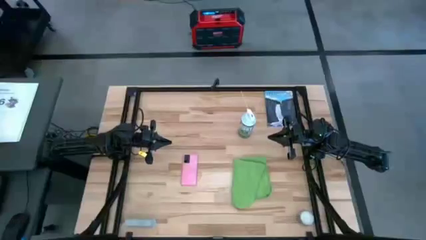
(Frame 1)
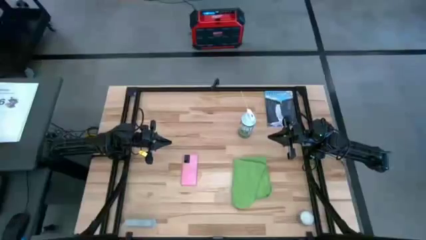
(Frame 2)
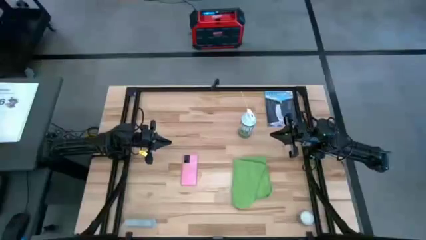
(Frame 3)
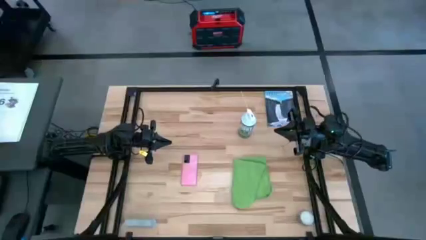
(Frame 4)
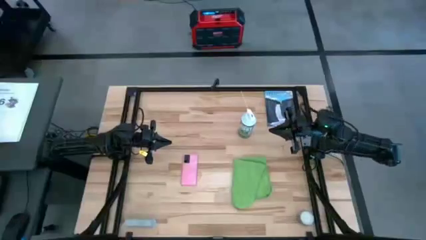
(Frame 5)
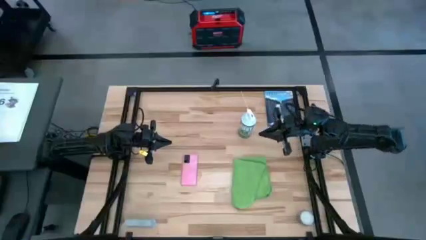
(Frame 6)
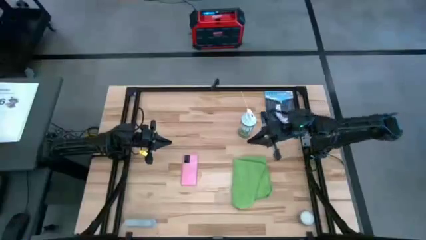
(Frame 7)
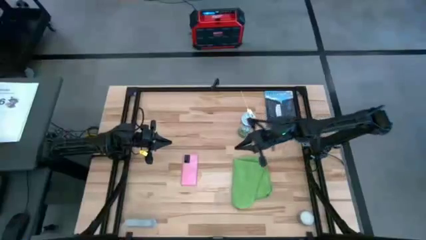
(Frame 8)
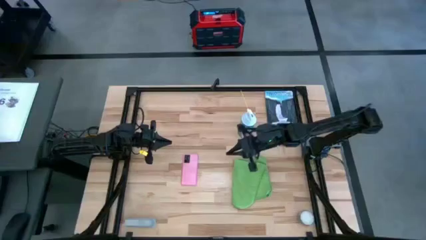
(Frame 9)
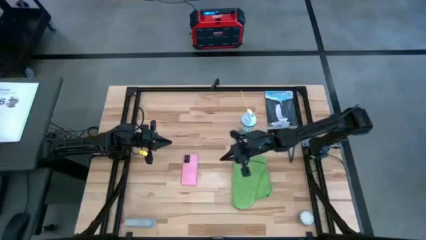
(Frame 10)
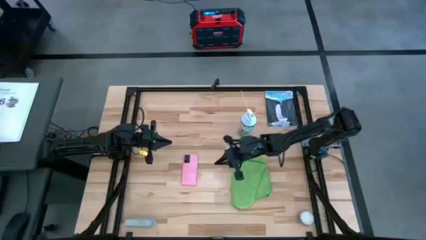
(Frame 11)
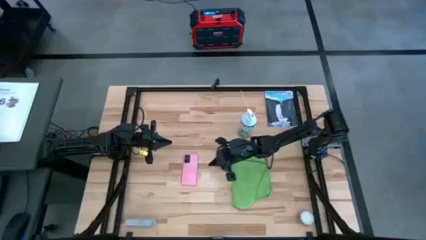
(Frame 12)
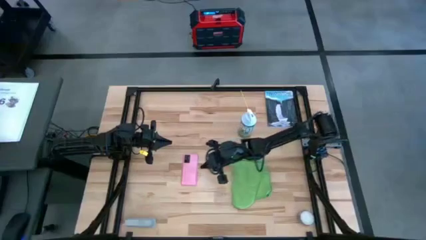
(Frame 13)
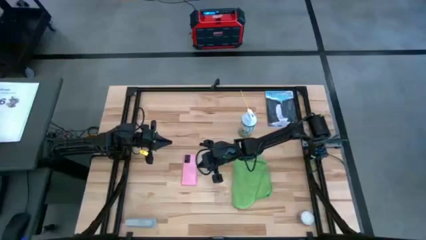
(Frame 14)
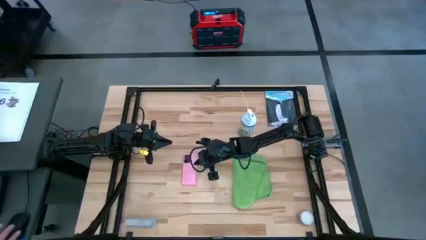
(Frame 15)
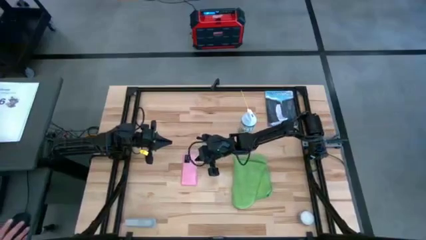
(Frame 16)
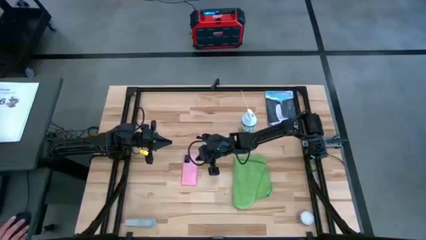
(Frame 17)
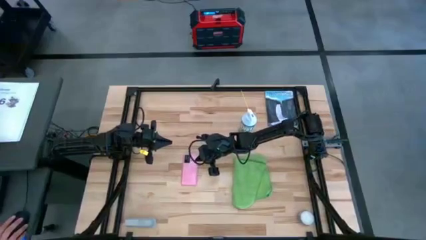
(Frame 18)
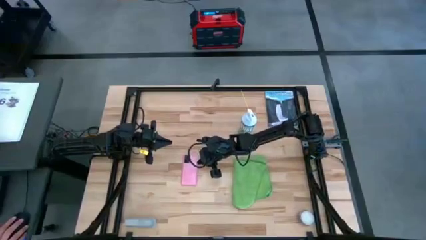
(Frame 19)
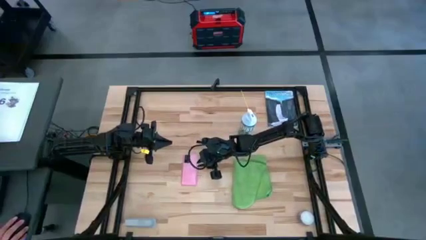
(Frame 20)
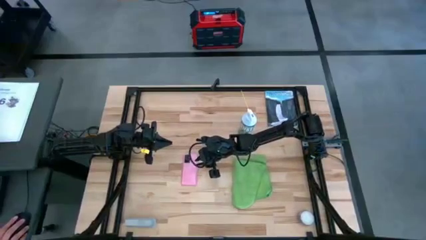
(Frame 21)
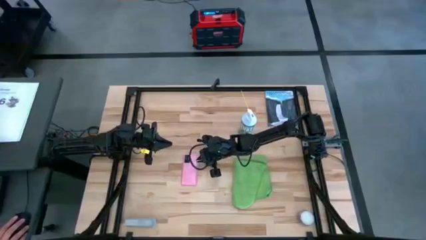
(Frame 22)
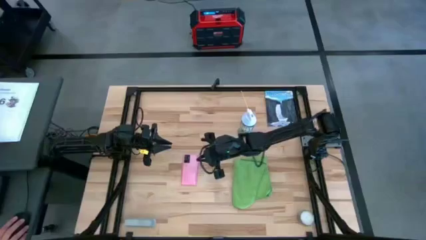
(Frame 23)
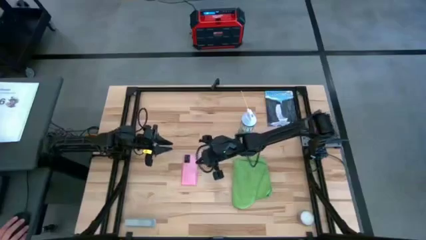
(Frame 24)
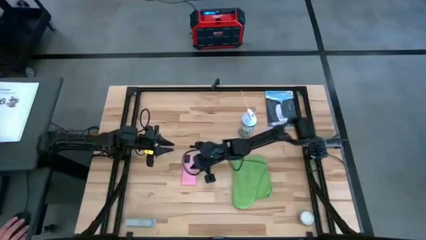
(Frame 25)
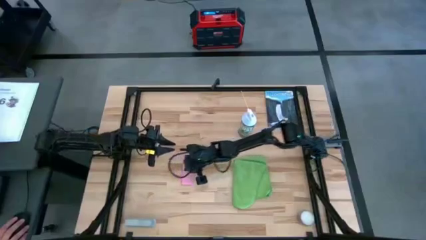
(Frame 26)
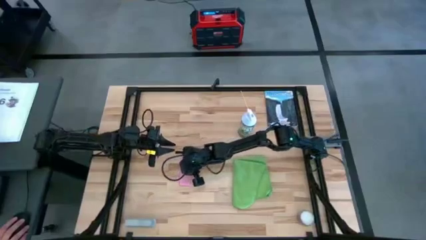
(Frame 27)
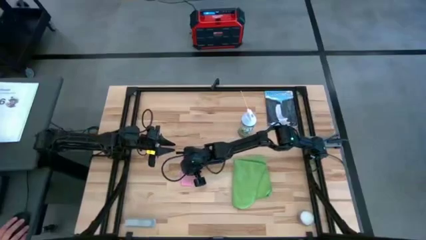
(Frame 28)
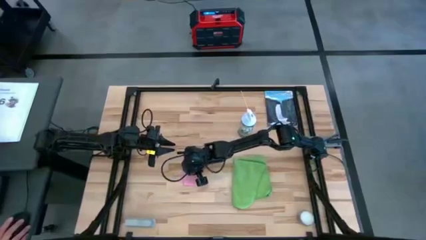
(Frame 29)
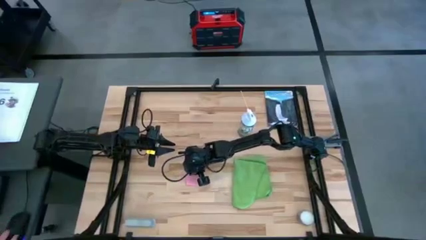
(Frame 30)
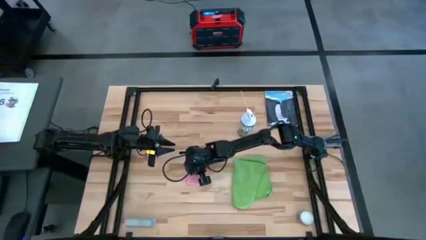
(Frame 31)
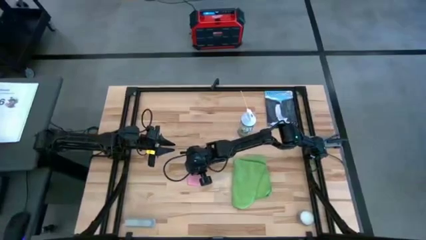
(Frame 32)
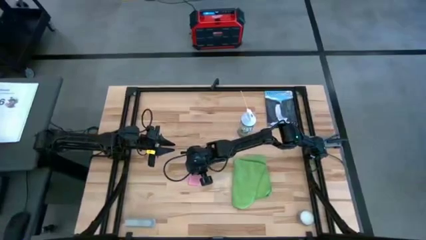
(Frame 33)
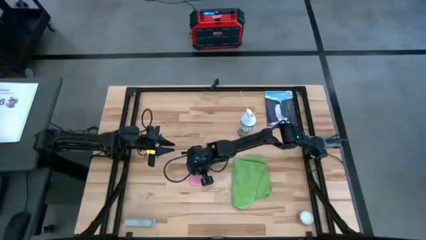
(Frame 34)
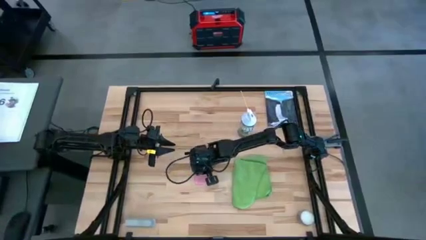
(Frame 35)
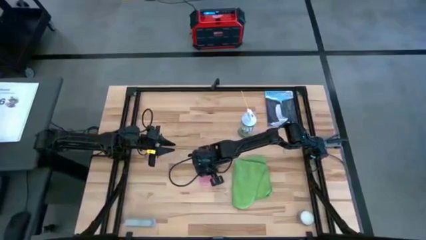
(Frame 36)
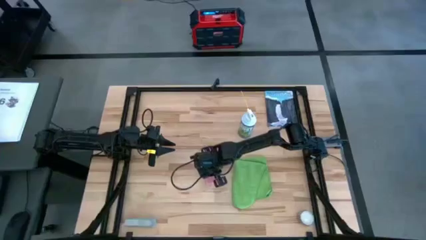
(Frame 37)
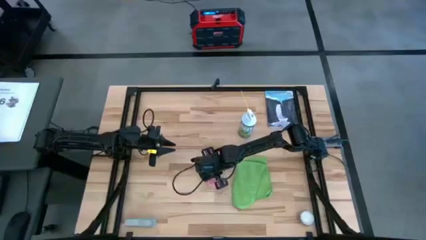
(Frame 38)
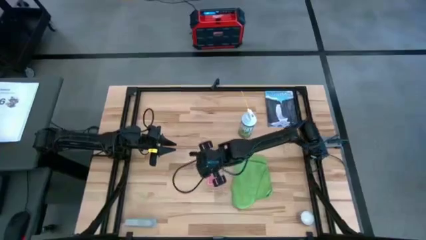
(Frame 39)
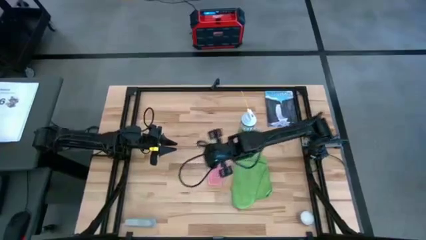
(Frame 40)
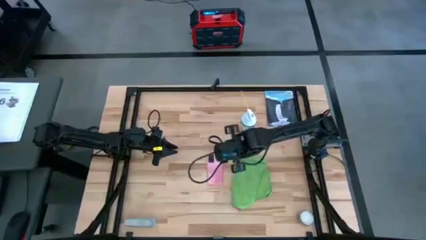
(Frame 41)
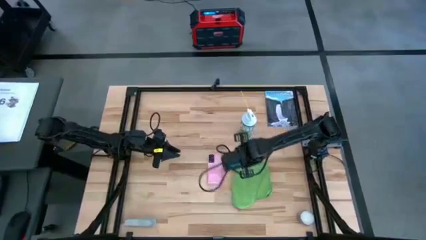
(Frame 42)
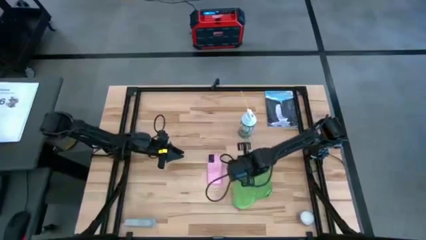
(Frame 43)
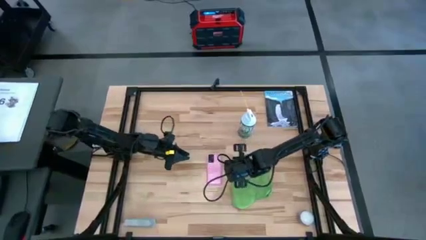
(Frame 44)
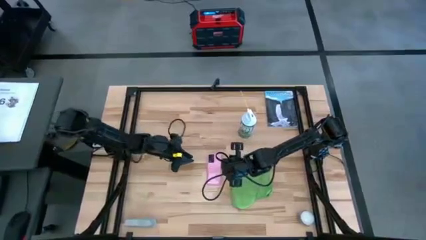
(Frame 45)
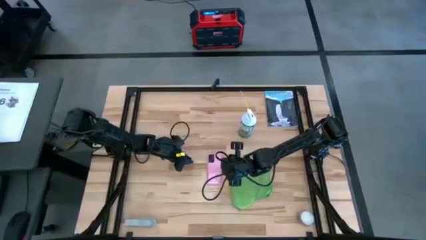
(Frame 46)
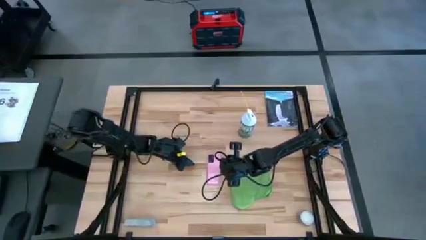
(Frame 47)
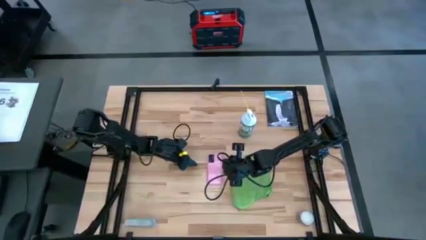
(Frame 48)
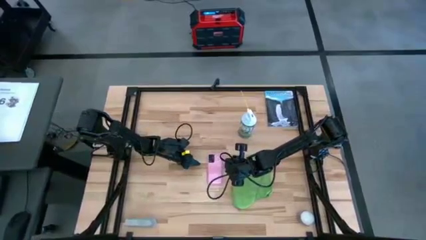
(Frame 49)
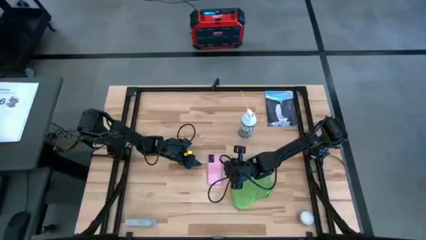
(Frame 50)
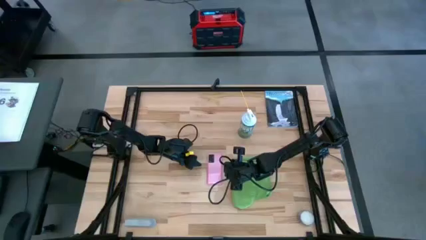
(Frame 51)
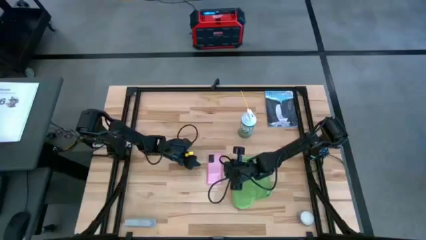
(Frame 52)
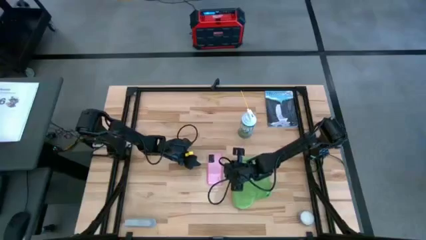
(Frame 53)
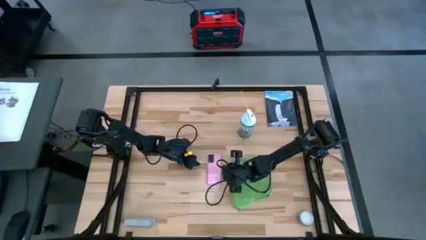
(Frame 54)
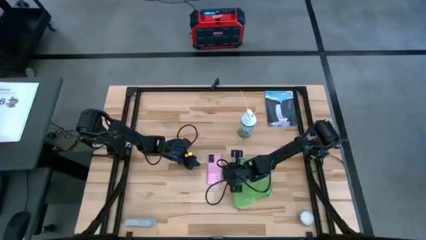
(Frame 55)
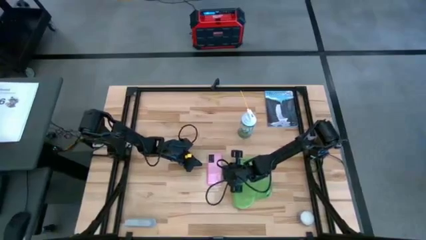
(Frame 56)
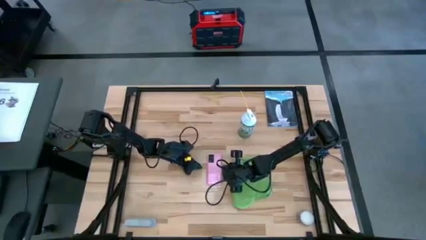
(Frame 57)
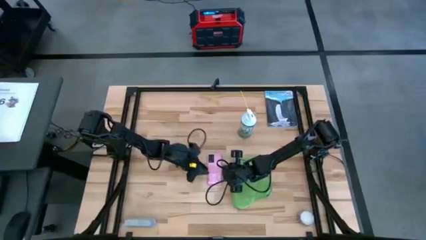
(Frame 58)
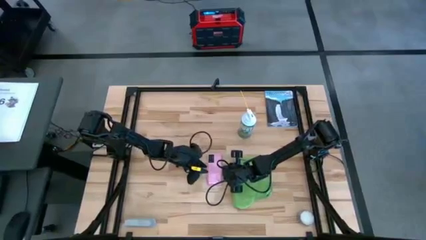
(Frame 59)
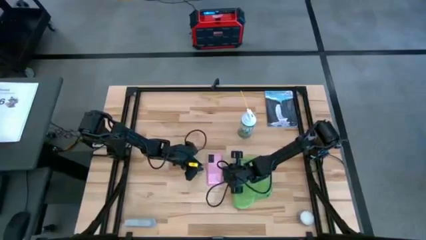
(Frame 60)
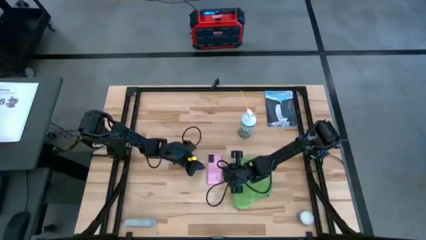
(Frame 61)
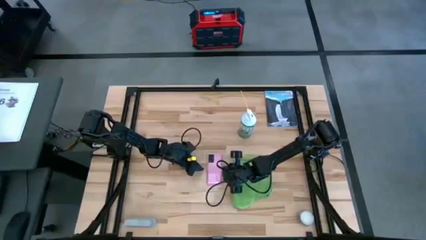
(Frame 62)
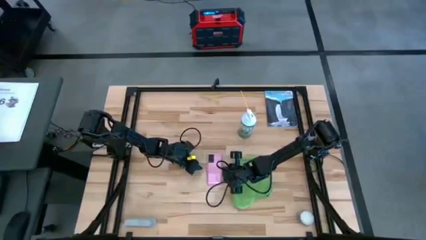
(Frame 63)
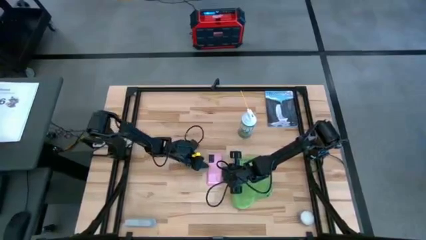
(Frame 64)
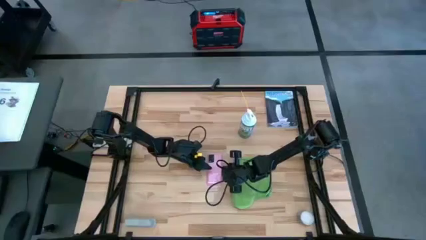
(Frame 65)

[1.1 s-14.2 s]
Task: Apply microfiber cloth
Spray the back of the pink phone using the white spray bottle
